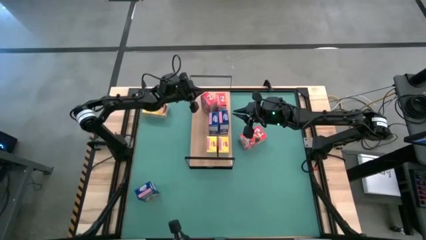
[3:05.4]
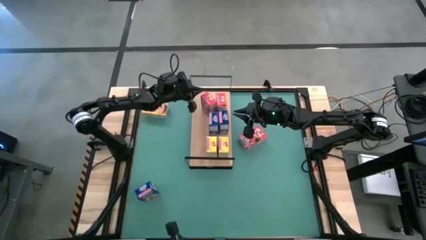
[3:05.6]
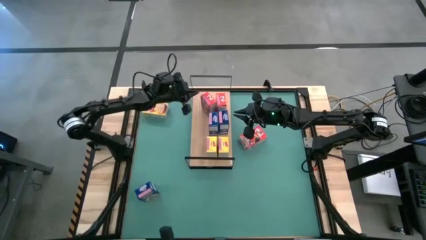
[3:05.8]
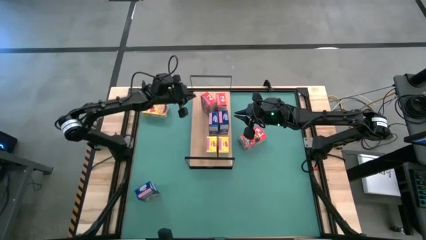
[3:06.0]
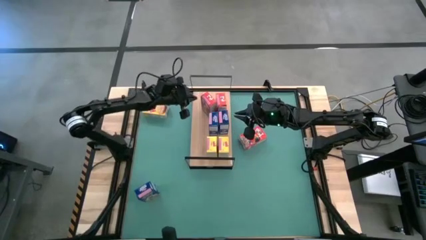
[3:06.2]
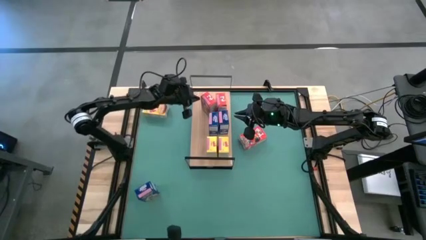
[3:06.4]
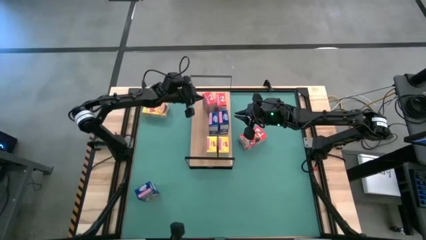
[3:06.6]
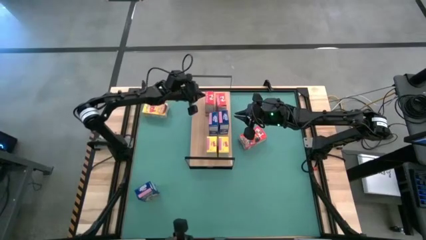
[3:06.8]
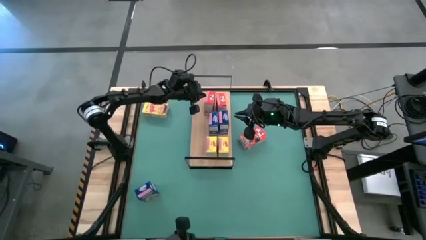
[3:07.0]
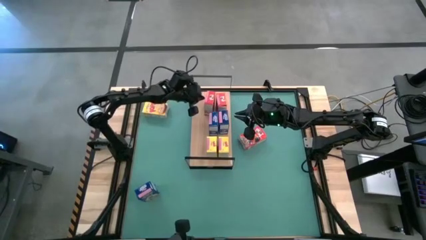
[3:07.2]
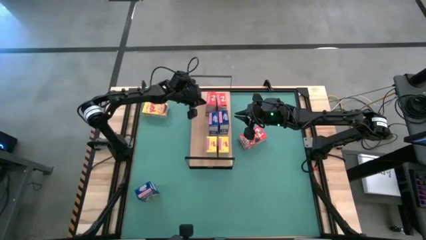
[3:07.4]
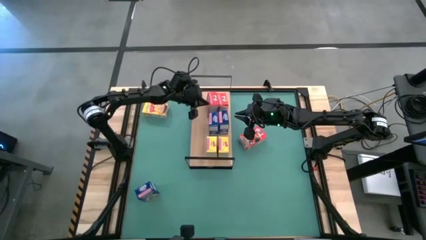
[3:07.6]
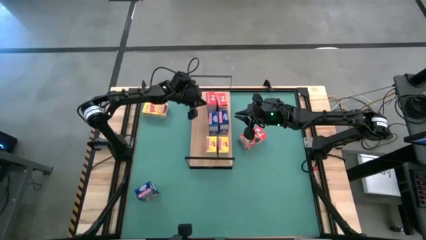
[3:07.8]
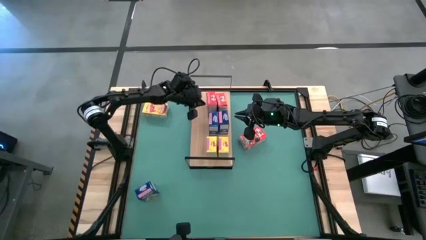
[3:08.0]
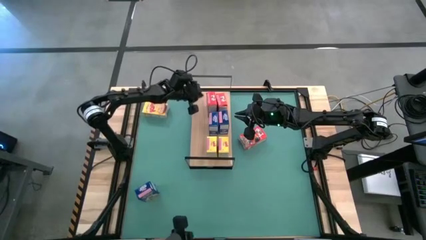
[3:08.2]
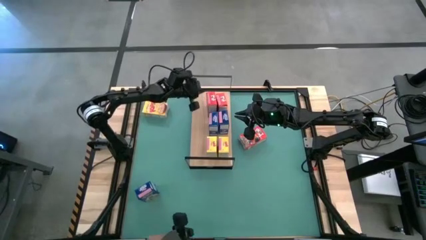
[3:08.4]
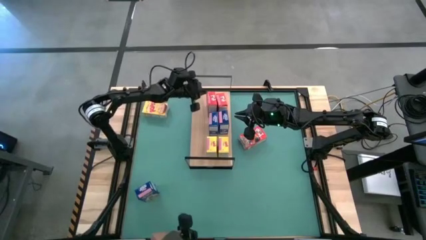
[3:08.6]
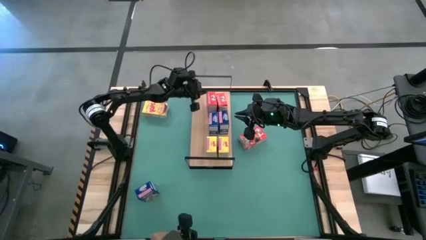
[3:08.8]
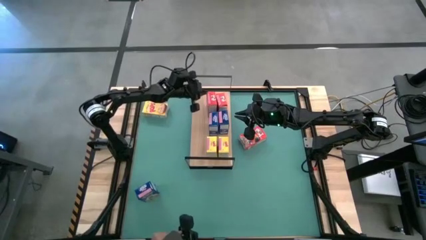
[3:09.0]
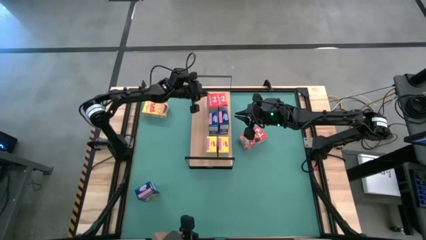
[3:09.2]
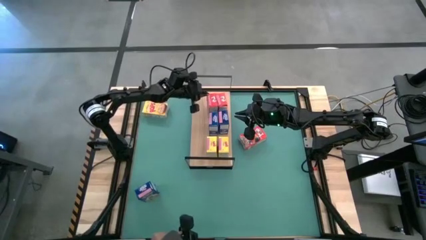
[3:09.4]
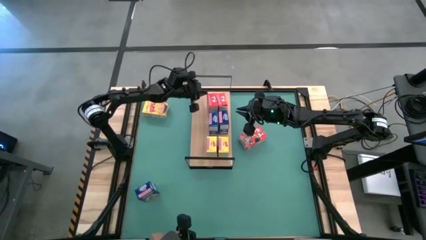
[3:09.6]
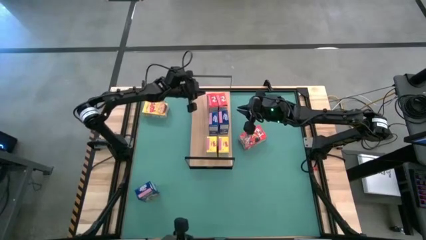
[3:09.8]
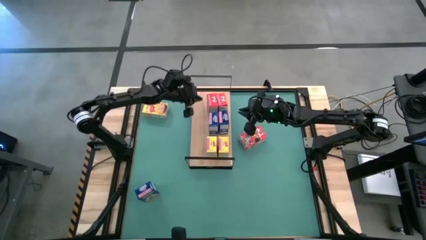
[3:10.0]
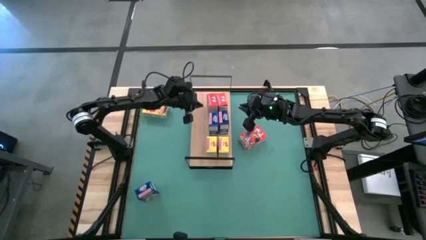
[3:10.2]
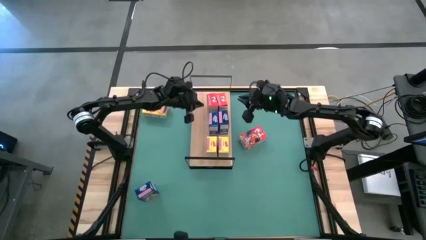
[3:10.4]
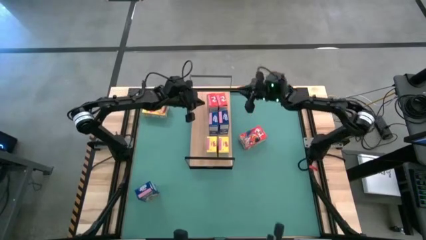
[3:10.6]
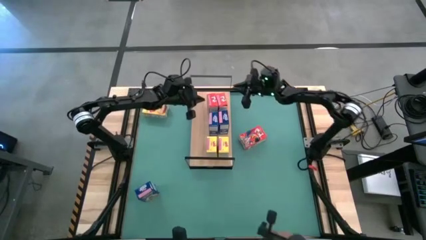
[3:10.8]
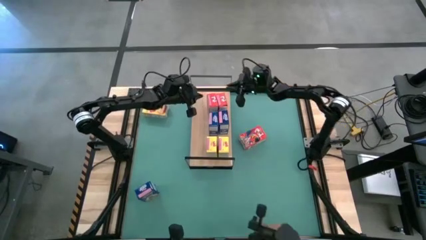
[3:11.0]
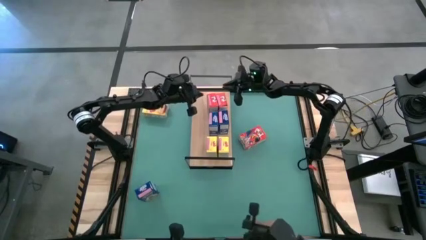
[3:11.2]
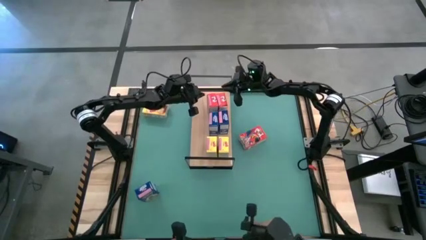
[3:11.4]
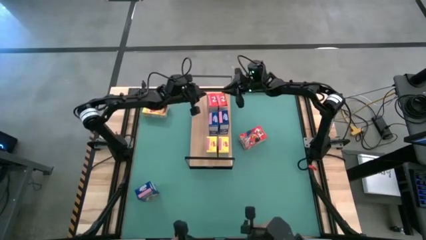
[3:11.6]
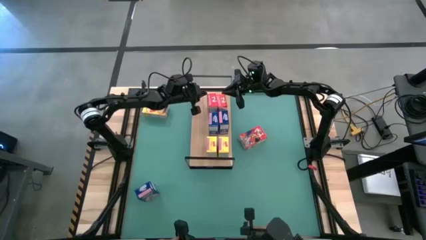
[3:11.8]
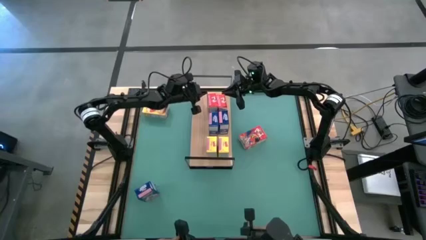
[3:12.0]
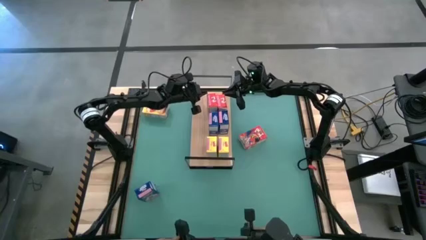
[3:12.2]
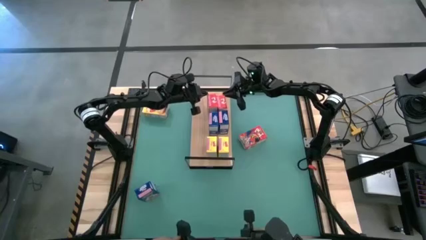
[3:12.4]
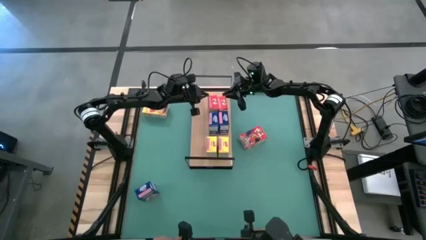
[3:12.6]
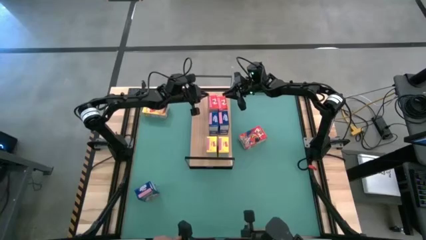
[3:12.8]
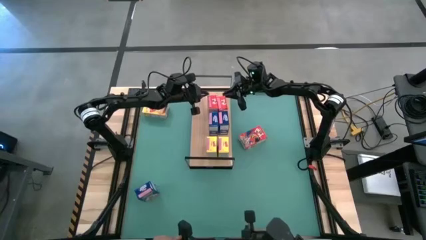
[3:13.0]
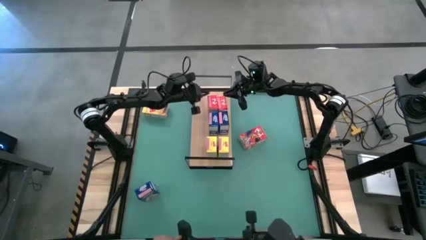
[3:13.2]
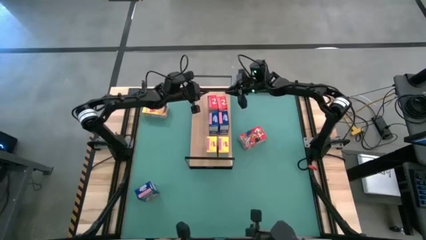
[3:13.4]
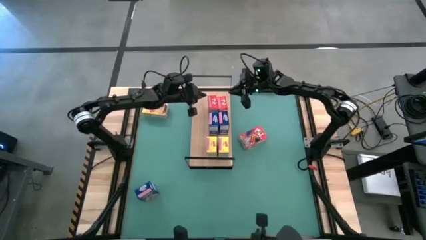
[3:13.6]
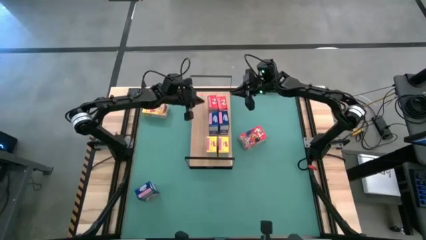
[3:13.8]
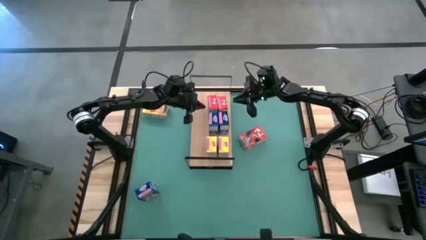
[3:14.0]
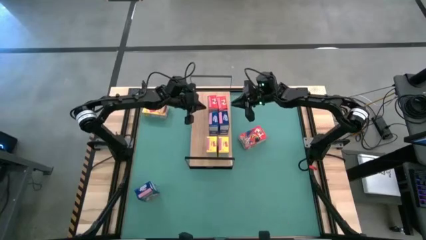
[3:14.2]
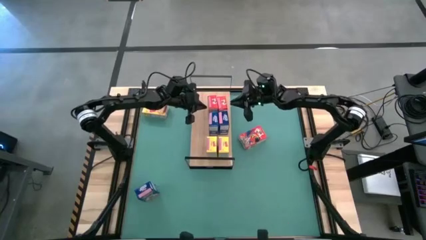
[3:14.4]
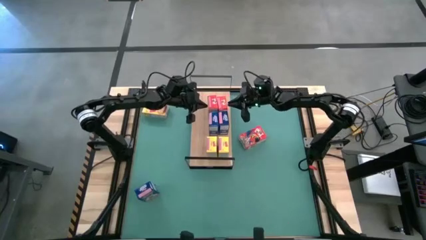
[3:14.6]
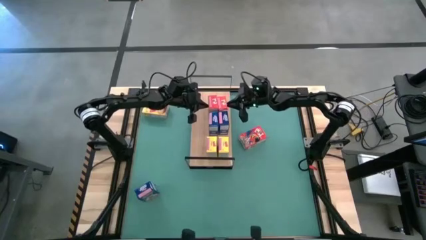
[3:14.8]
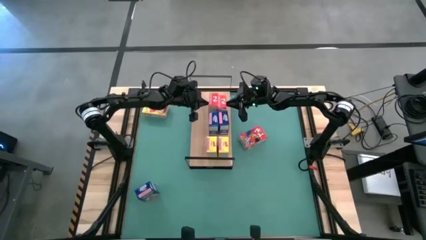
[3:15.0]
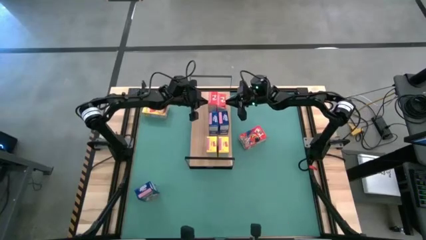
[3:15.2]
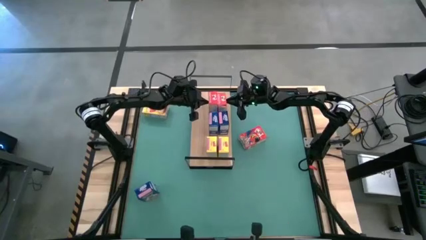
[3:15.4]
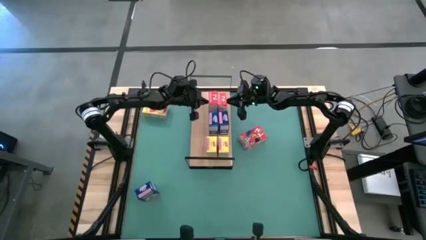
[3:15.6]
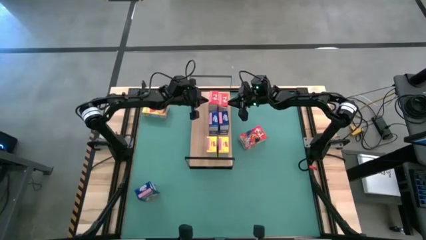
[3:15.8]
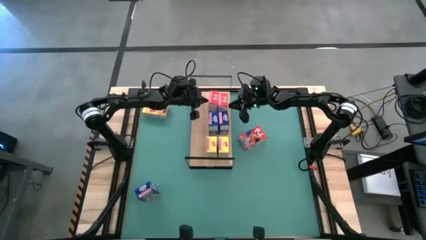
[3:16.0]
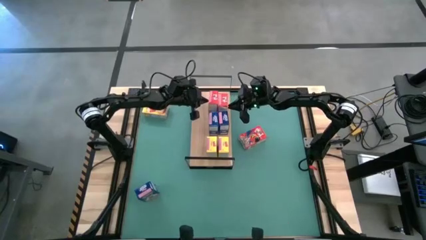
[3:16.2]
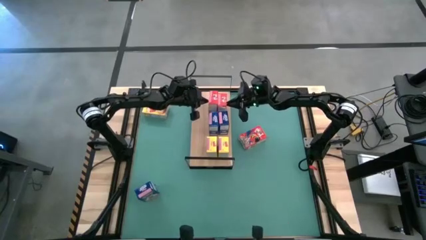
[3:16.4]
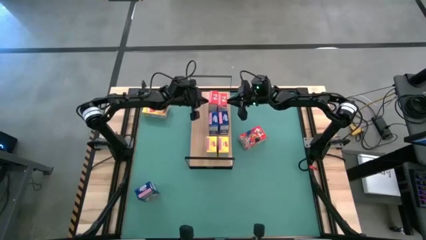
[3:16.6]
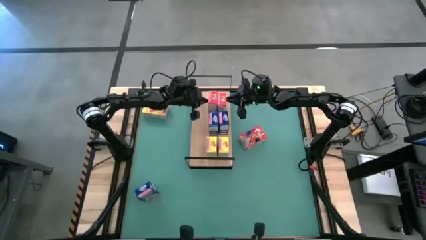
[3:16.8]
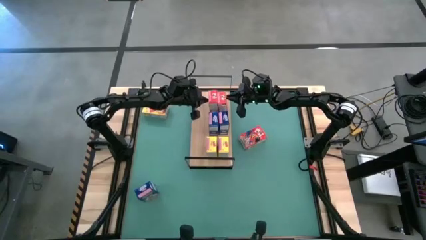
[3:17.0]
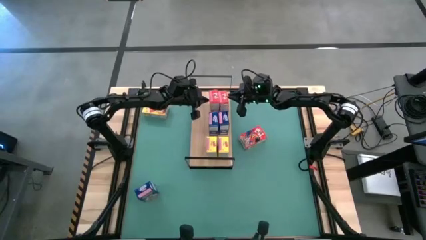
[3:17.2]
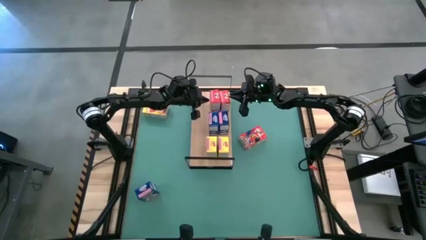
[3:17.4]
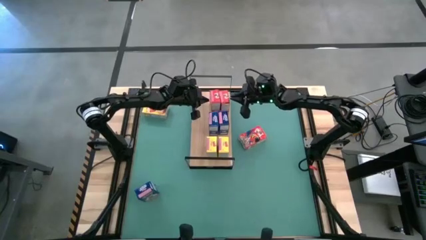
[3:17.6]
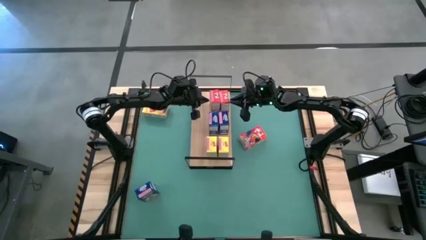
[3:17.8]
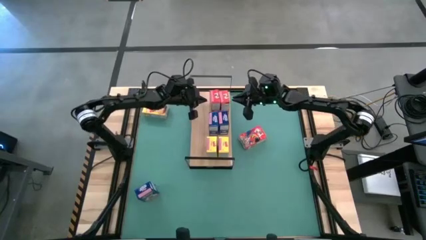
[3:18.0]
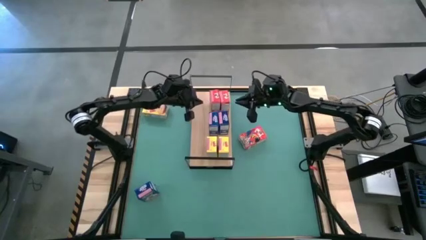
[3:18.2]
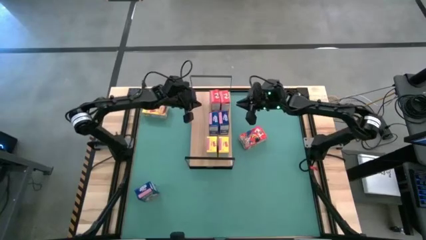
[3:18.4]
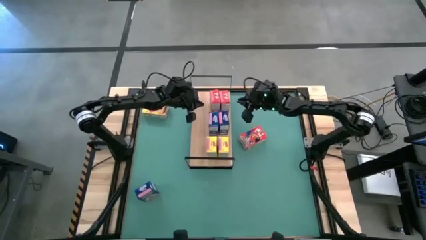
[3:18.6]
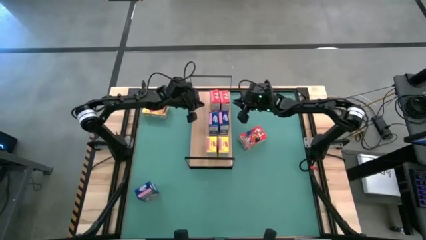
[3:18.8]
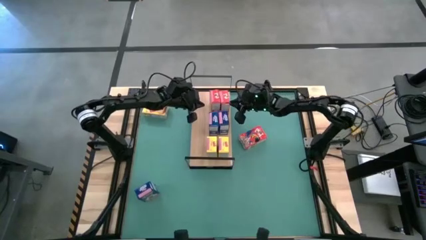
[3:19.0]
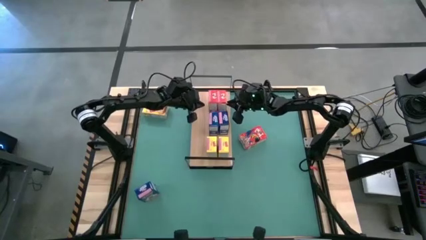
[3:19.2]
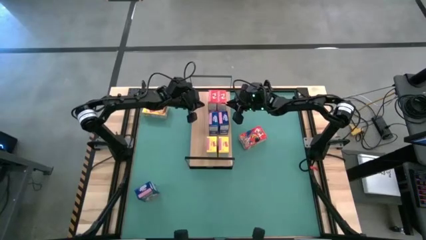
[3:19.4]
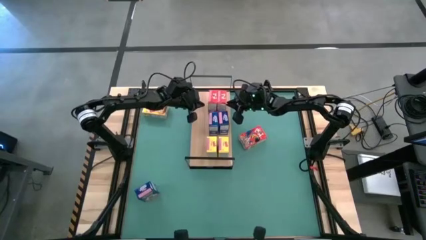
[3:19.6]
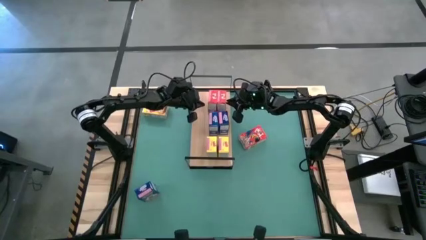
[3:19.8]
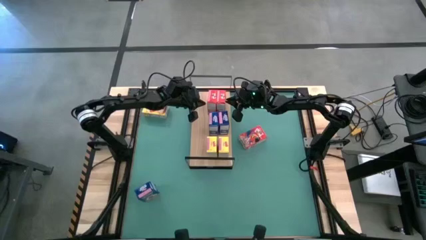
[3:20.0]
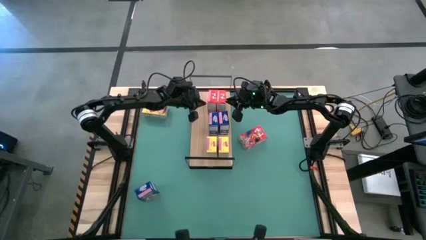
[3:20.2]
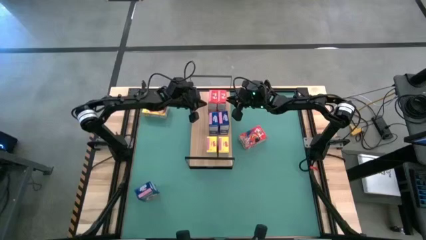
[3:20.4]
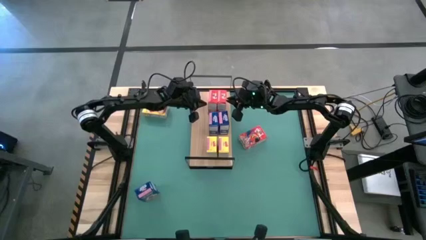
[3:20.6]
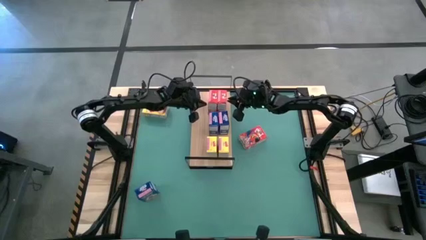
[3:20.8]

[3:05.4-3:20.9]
Task: Stack cereal on shelf
Put the top red cereal box on the shelf aligned with the other red cereal box

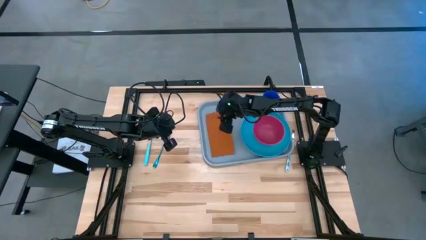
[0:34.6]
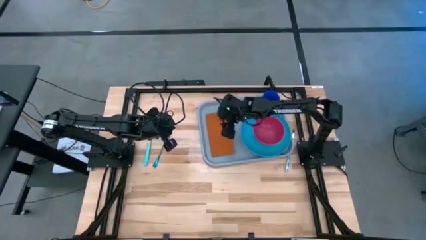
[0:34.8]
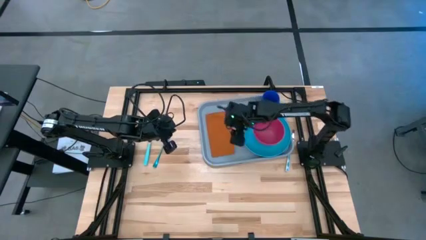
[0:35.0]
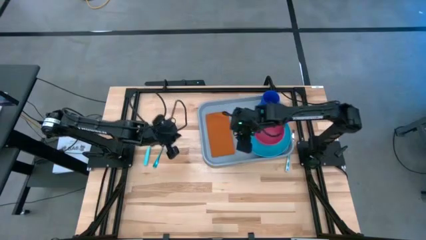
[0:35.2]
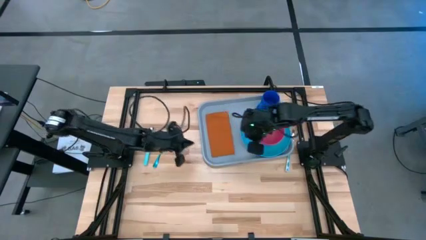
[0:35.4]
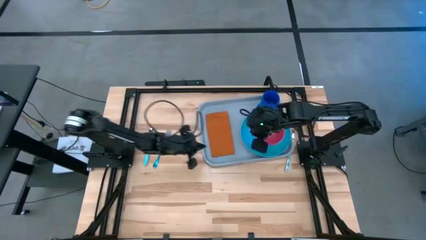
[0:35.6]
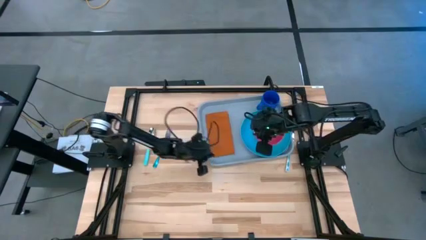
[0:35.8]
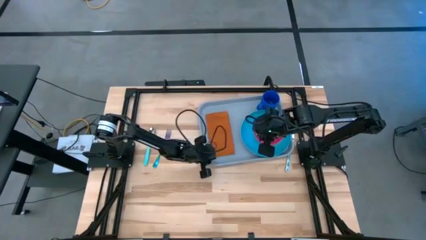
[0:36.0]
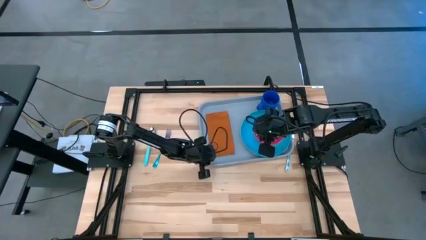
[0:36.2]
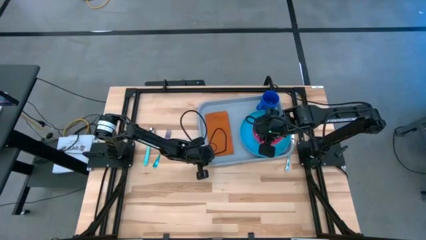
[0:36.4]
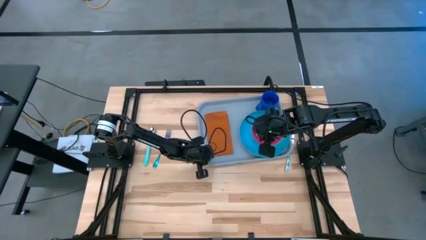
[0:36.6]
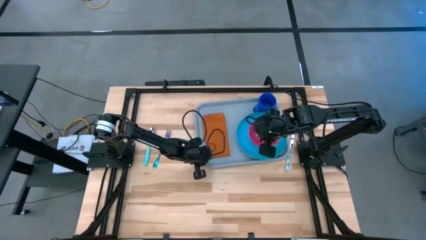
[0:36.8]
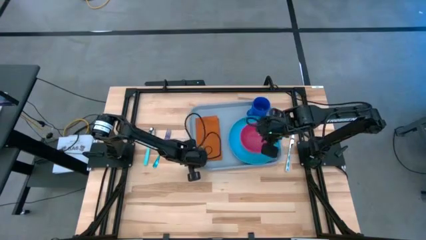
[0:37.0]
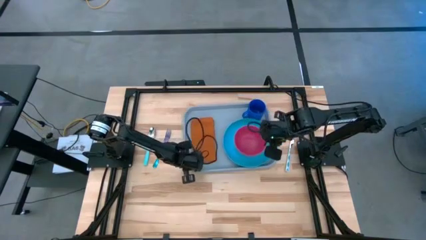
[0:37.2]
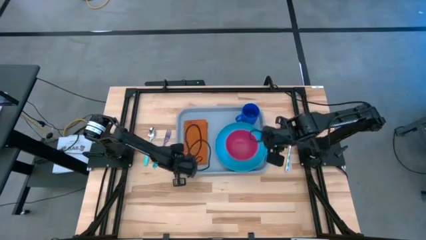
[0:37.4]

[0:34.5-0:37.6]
Task: Set up tray
Move the gray tray to the center of the table
